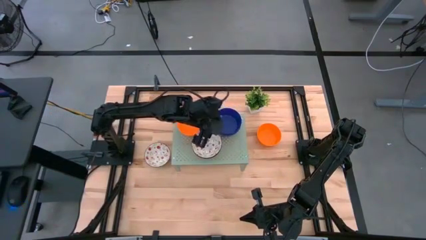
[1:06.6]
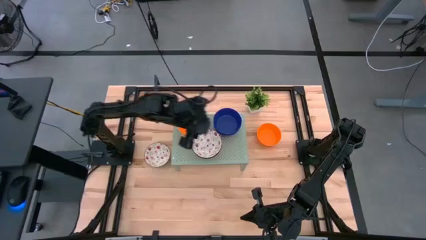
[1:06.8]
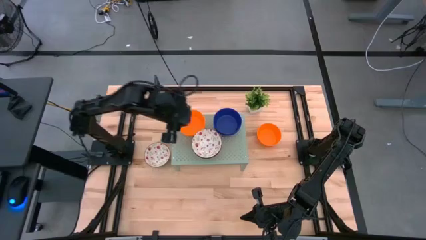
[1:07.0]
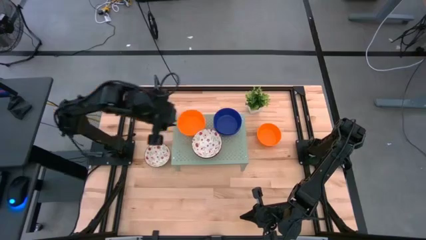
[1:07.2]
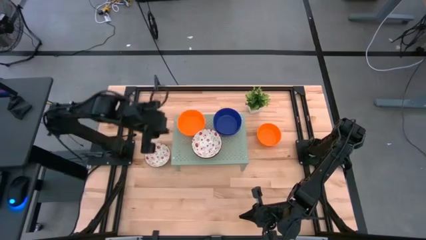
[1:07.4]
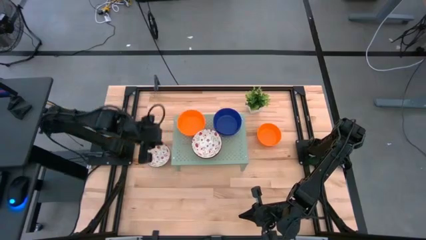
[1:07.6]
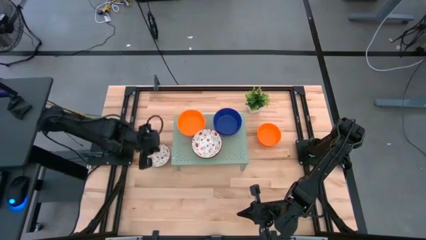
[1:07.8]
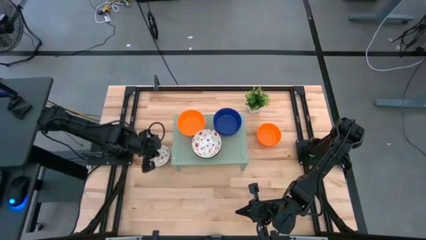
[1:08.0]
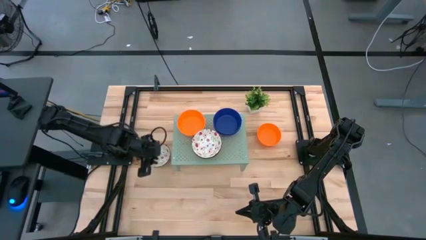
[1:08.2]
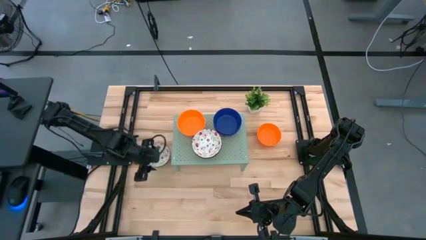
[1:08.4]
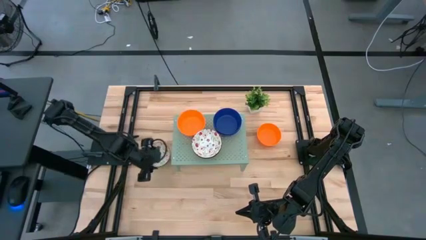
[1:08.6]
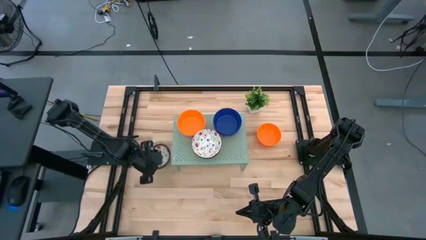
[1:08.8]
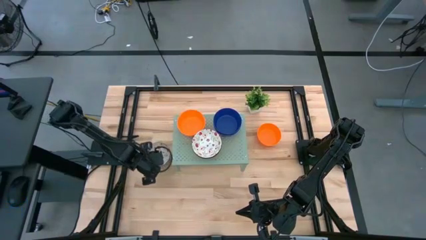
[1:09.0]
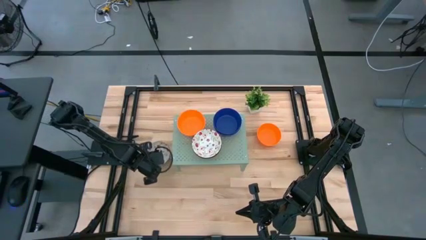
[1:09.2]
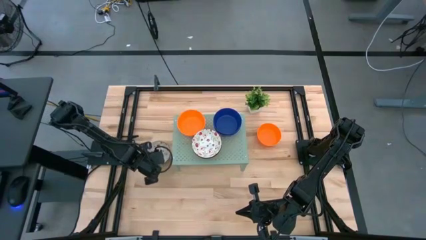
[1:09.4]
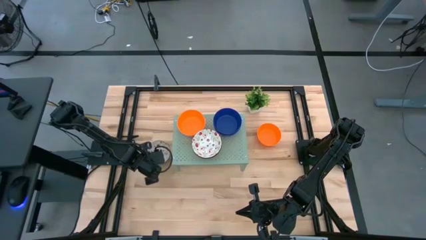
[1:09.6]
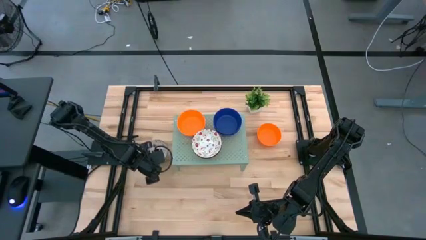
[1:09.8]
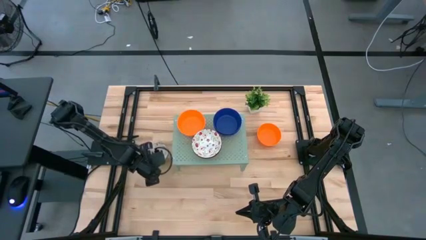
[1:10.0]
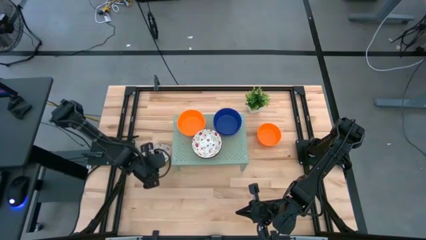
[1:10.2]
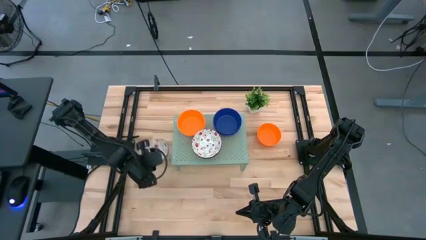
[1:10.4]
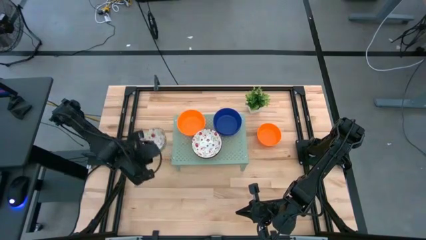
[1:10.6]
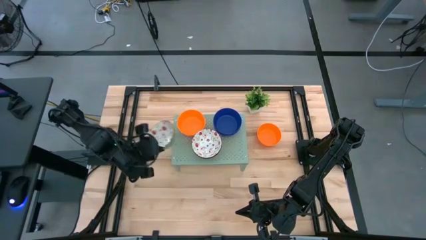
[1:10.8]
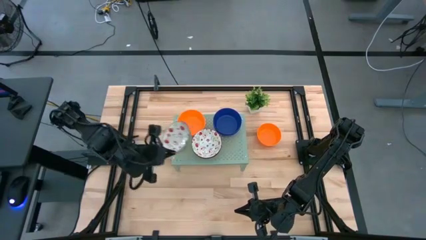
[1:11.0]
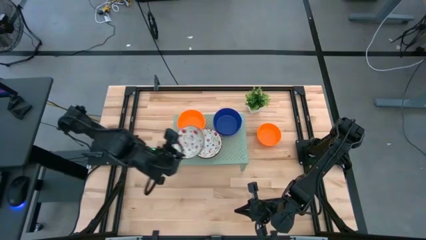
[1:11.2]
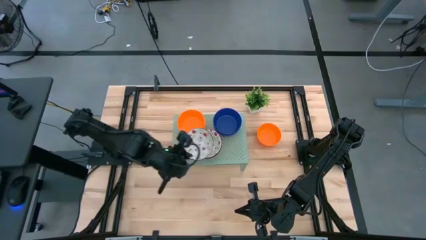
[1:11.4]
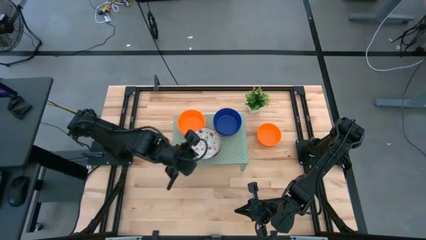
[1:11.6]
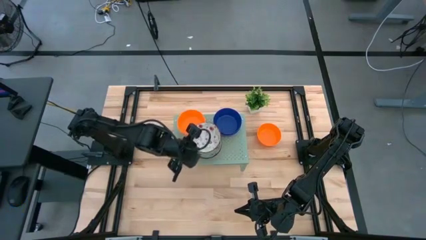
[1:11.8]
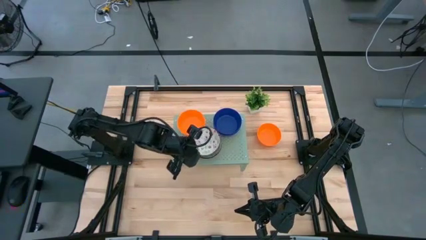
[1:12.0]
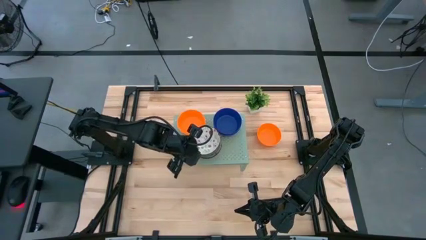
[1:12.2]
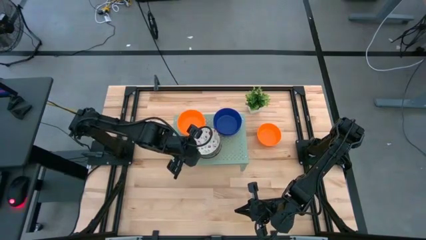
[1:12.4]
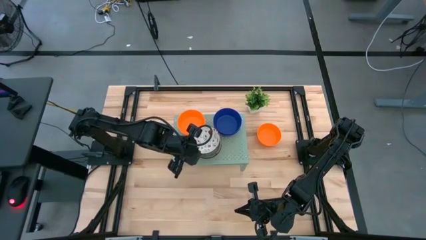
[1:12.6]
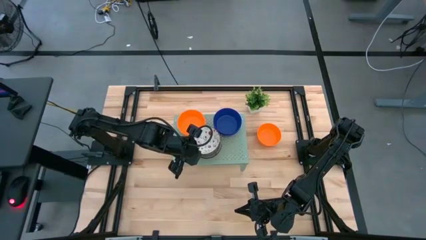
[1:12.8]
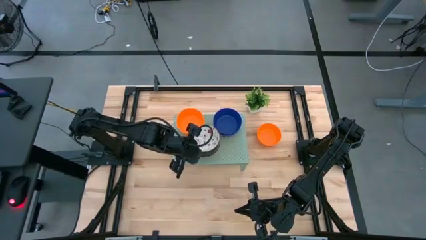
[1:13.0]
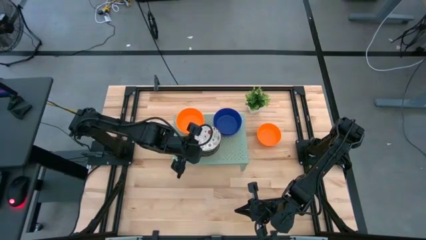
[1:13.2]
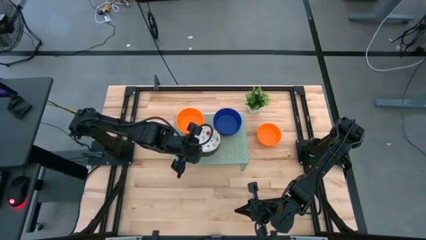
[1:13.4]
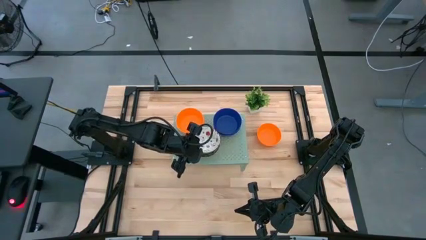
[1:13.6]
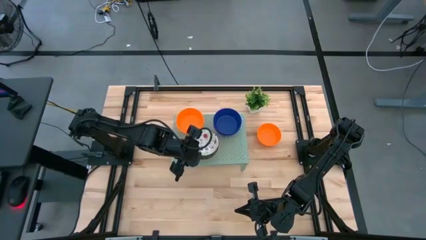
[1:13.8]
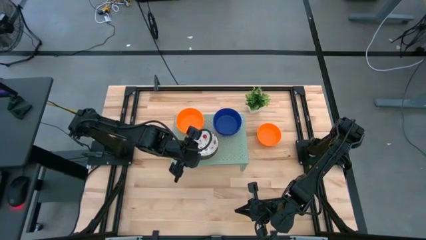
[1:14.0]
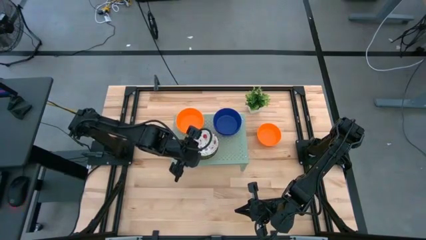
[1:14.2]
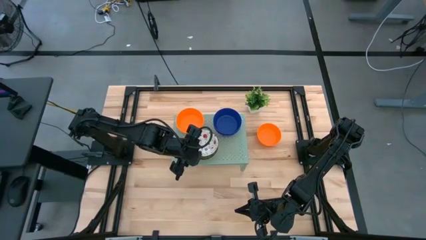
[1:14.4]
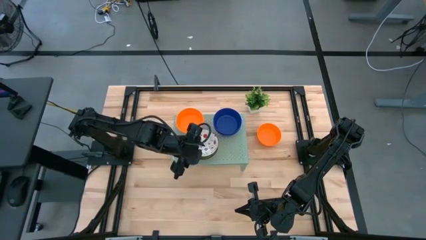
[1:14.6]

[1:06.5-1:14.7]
Task: Pick & Place Mini bowls
Stack the white patterned bowl on top of the white patterned bowl on the shelf

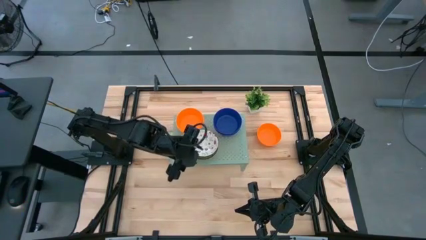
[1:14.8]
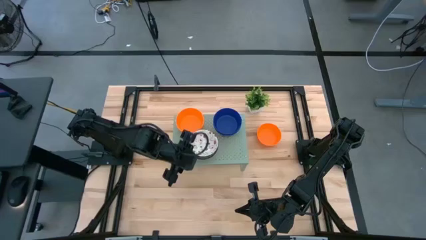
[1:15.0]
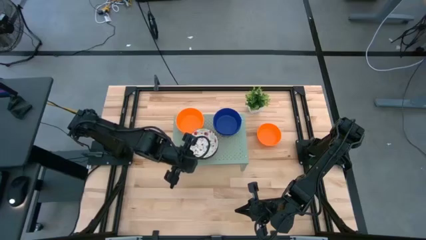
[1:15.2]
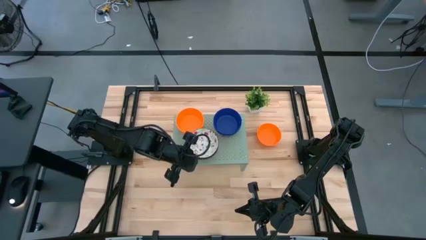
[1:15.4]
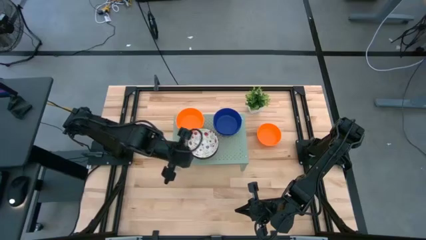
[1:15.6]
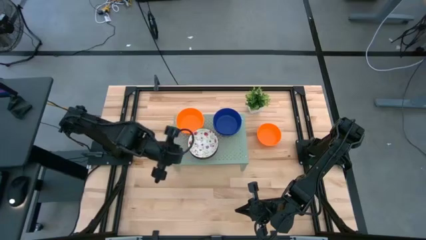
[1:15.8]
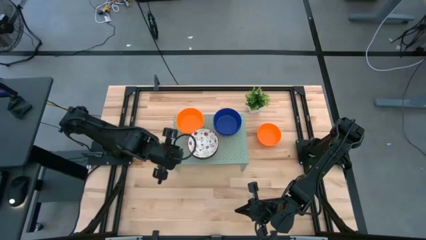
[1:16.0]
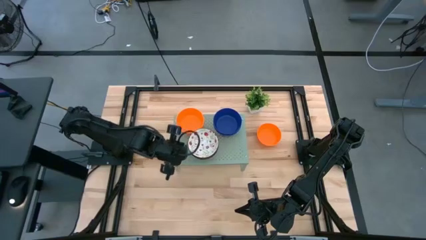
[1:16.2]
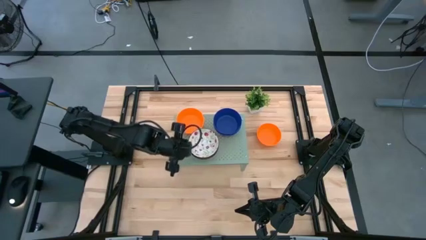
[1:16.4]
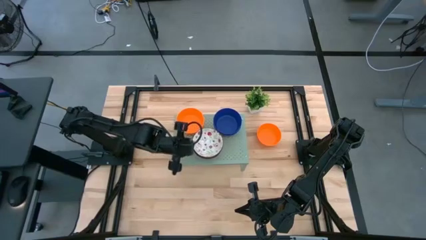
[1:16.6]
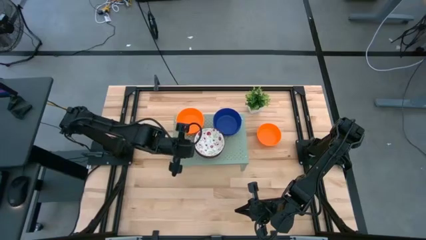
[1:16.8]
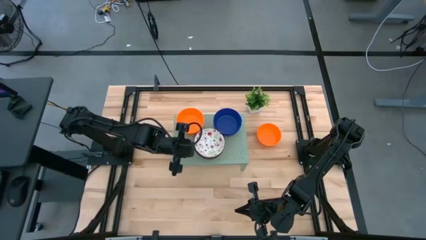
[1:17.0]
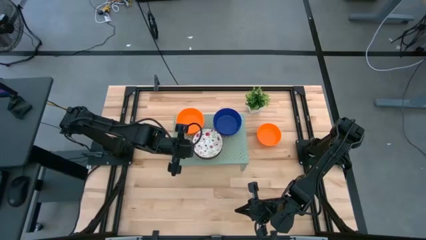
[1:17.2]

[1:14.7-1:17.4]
Adjust the white patterned bowls on the shelf

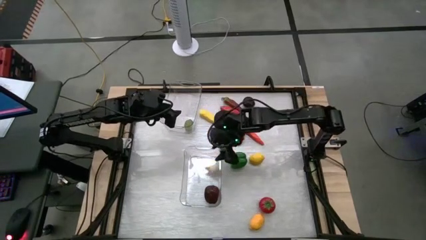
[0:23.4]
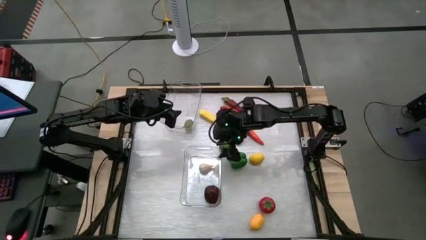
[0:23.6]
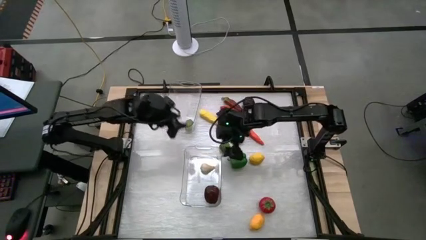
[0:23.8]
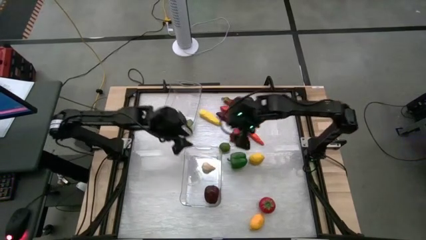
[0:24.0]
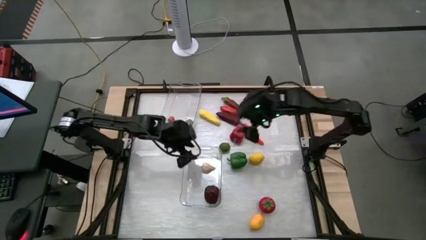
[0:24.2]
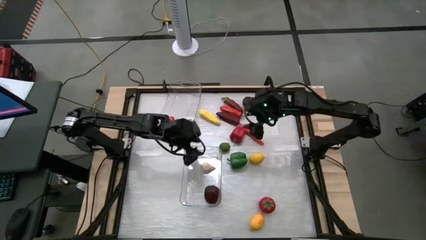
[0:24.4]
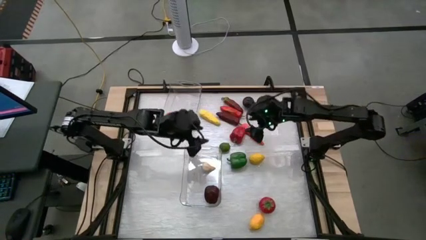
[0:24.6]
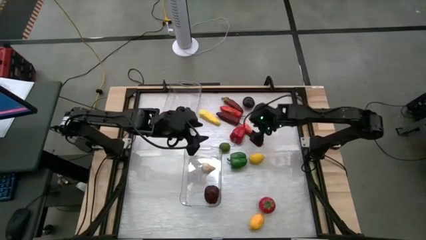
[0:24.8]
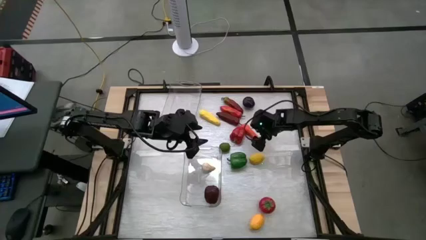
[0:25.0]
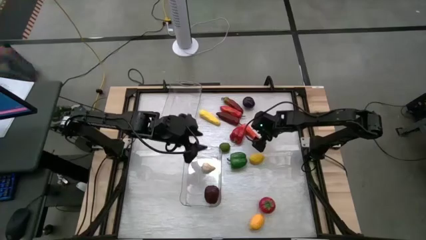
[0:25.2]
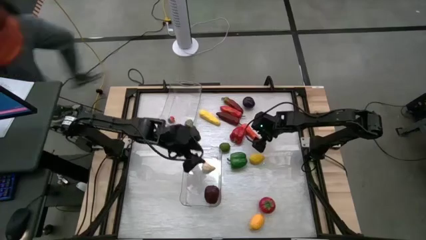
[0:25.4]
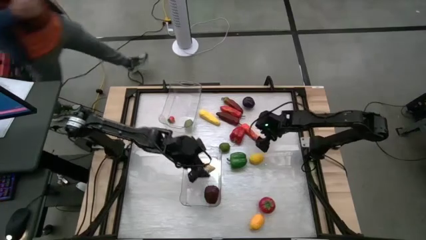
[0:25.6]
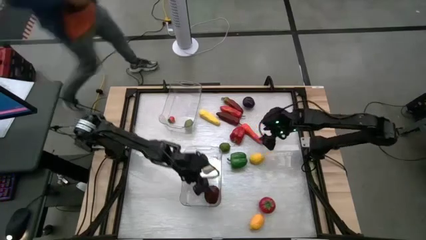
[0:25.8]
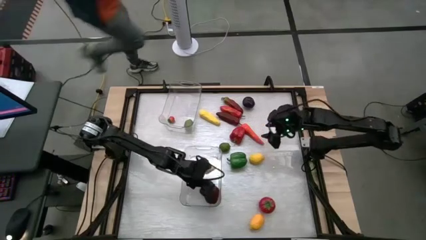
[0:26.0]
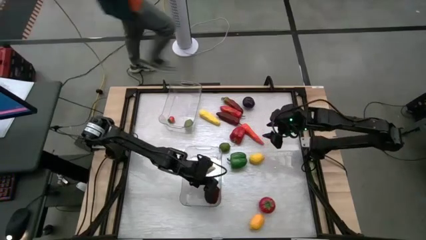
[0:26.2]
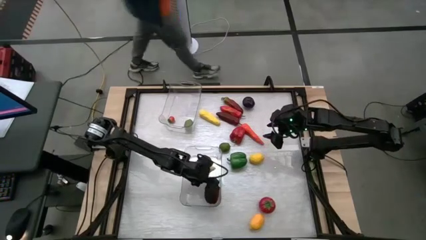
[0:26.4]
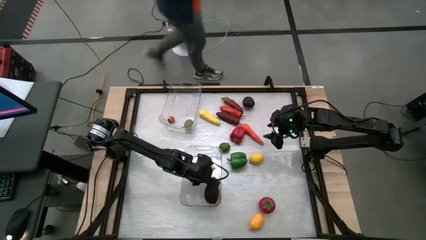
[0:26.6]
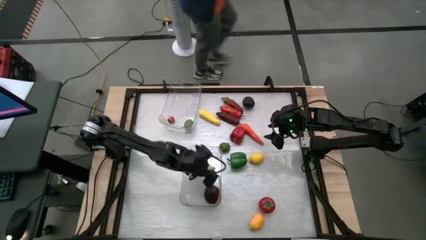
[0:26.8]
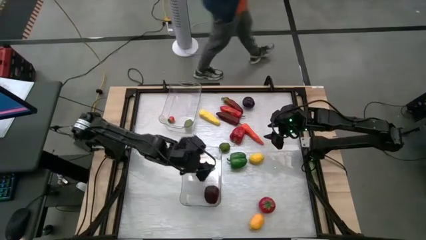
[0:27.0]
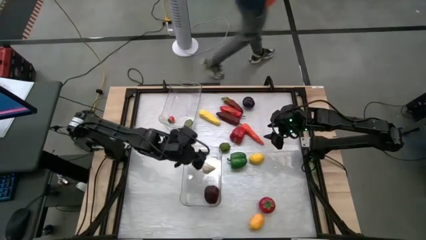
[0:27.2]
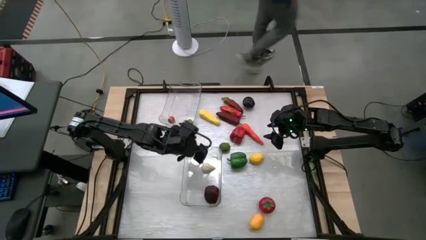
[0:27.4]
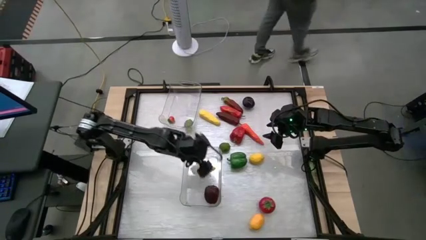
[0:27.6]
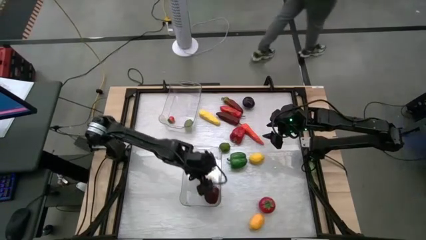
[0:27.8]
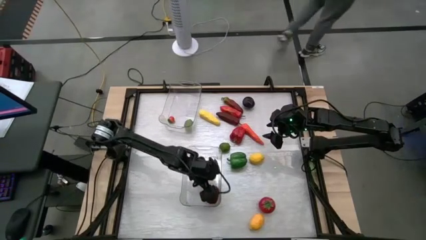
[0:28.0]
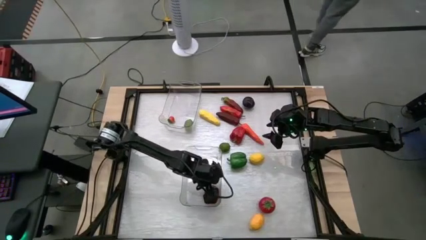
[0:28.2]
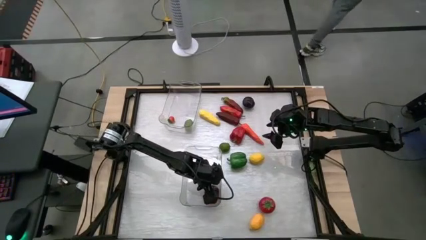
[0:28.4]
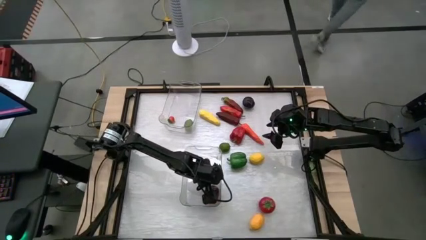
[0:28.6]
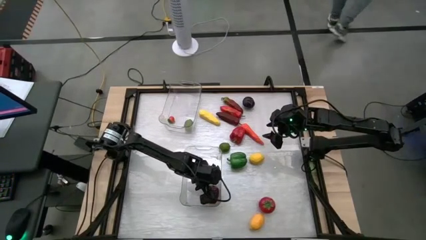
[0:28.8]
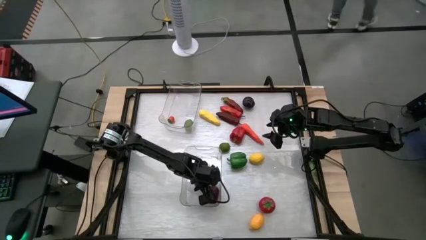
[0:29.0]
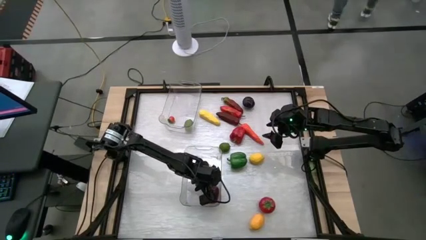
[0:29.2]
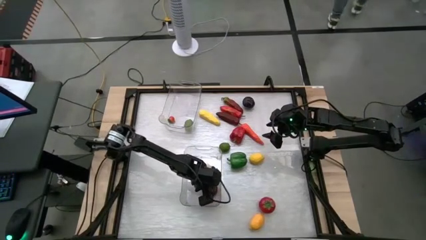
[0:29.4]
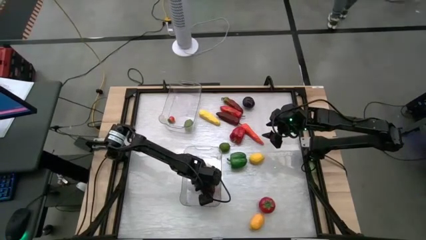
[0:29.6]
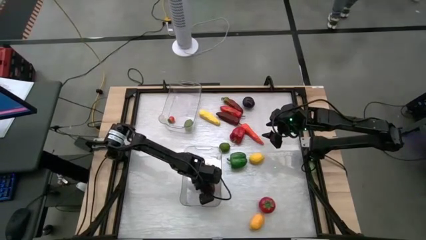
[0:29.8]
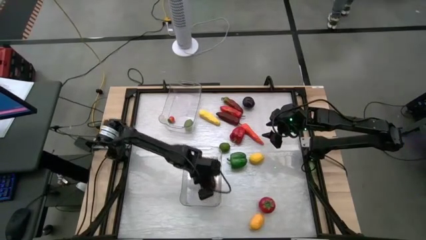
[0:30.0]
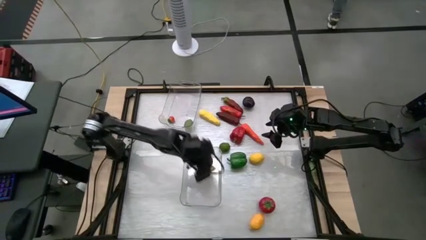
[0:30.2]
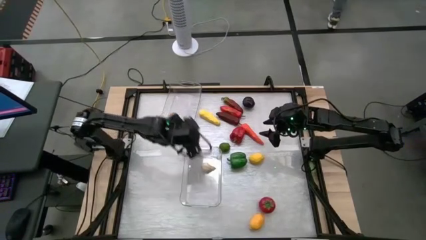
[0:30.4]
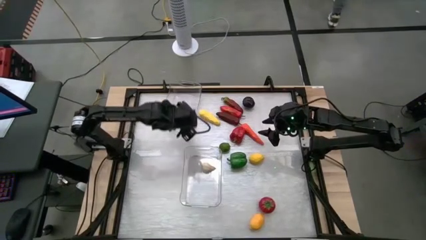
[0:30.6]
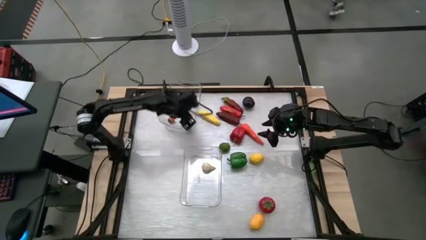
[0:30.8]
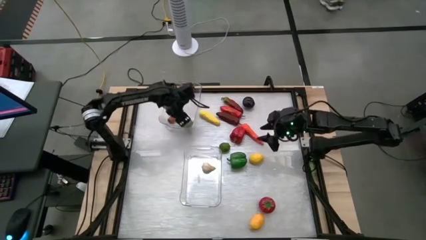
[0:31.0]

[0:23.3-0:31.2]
Task: Sort produce into baskets
Put the red apple into the top transparent bin
